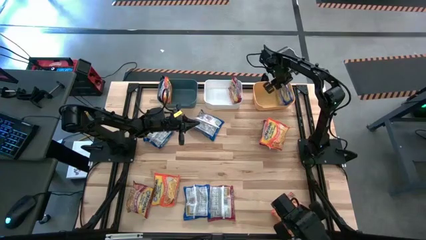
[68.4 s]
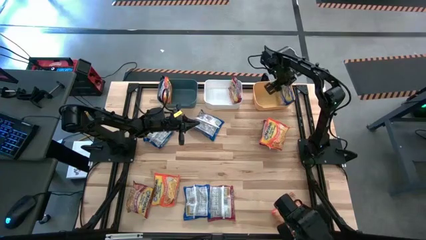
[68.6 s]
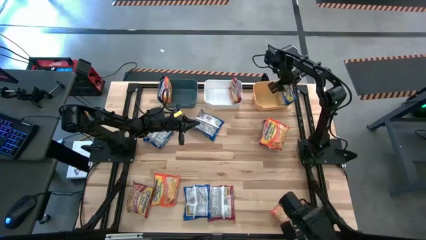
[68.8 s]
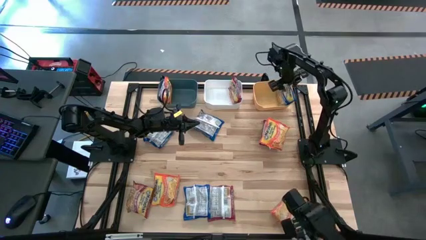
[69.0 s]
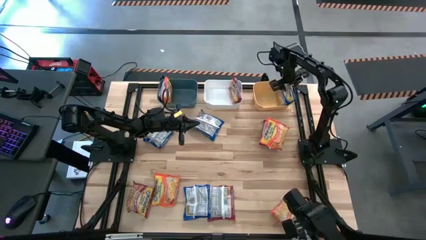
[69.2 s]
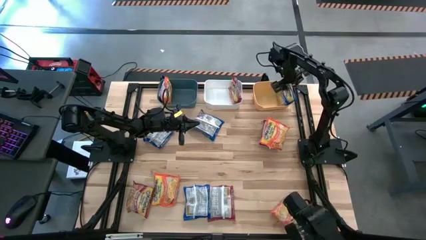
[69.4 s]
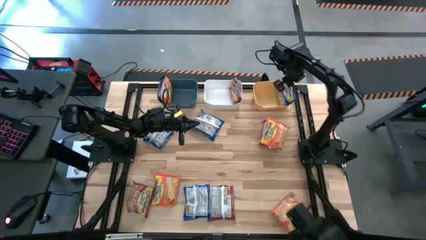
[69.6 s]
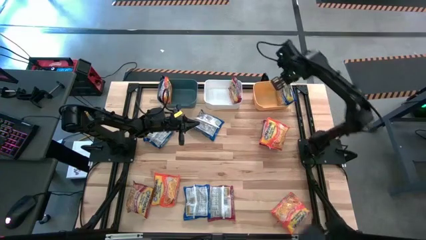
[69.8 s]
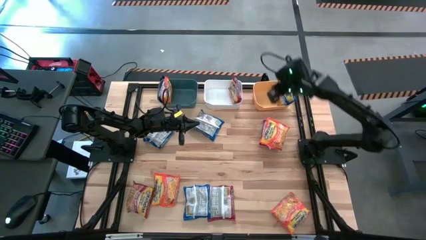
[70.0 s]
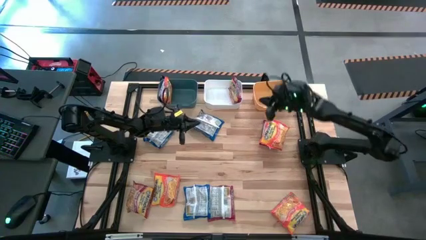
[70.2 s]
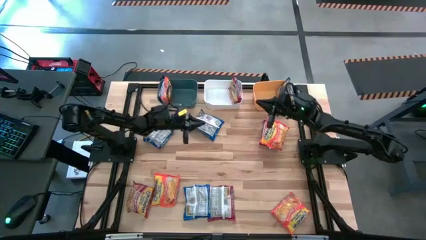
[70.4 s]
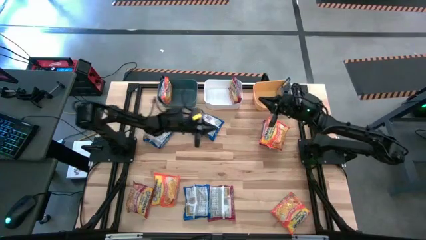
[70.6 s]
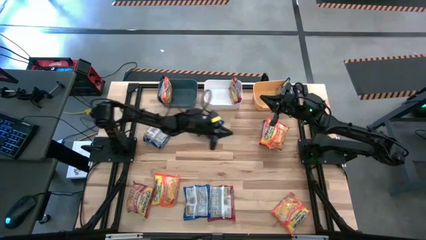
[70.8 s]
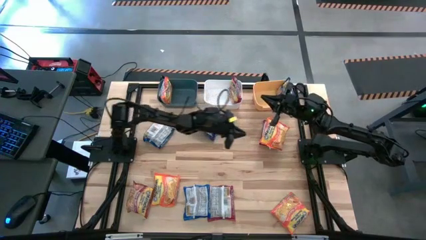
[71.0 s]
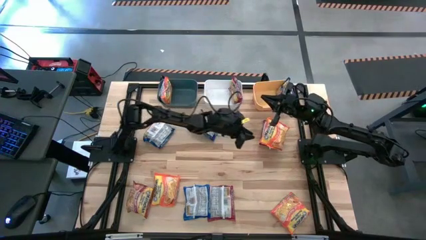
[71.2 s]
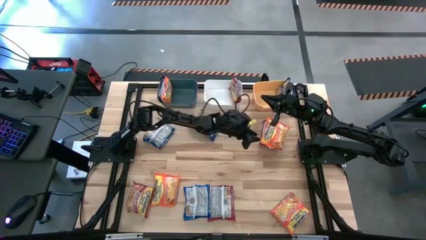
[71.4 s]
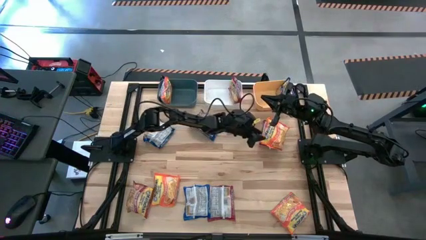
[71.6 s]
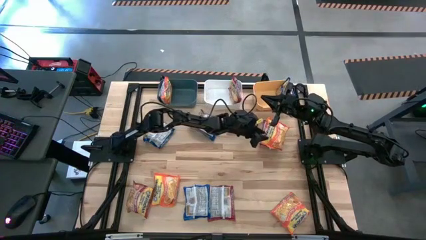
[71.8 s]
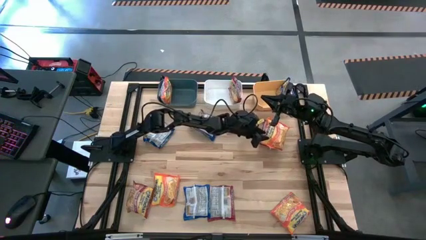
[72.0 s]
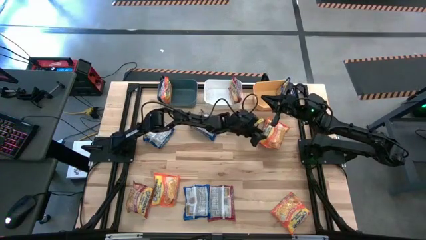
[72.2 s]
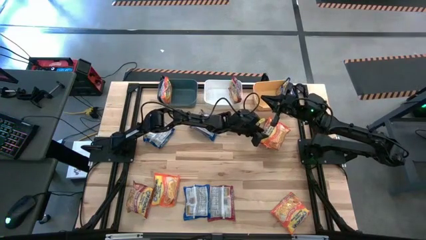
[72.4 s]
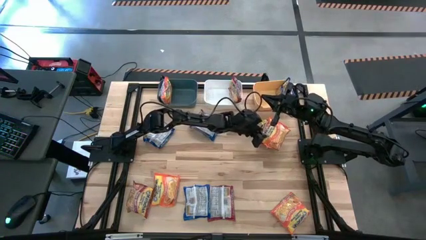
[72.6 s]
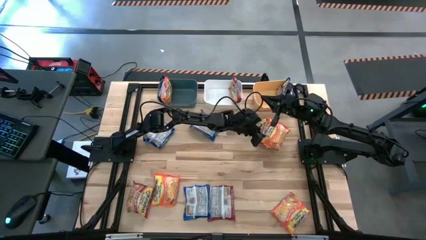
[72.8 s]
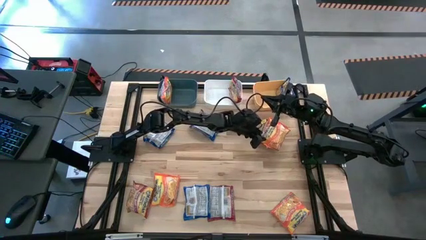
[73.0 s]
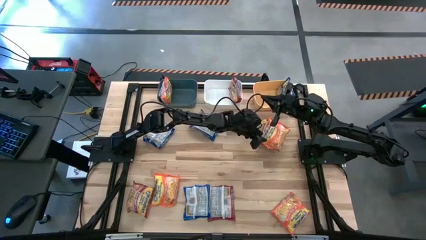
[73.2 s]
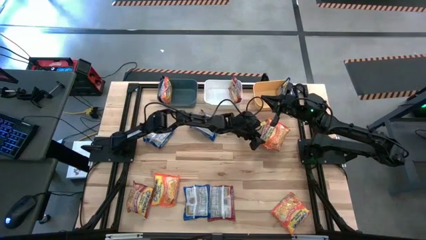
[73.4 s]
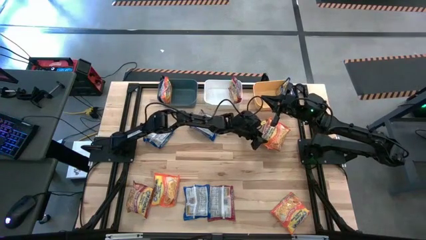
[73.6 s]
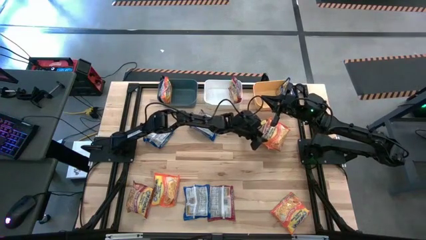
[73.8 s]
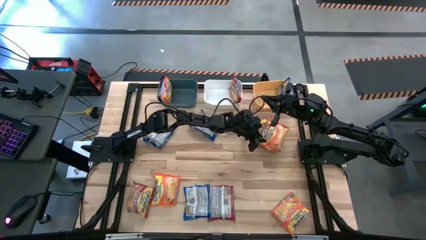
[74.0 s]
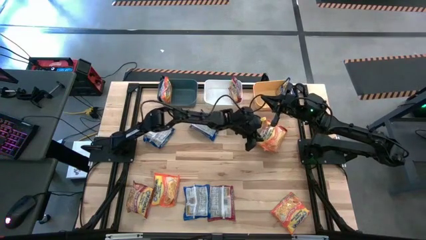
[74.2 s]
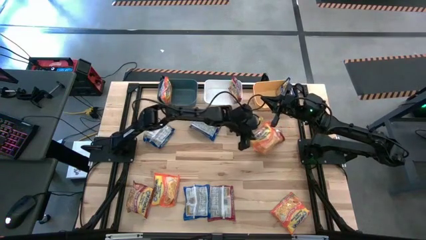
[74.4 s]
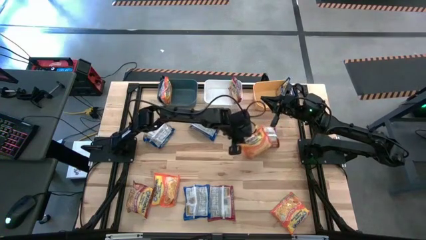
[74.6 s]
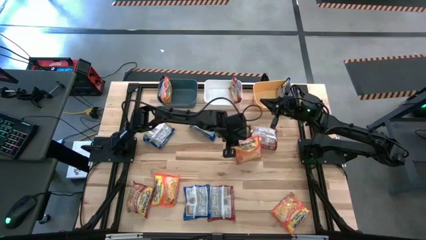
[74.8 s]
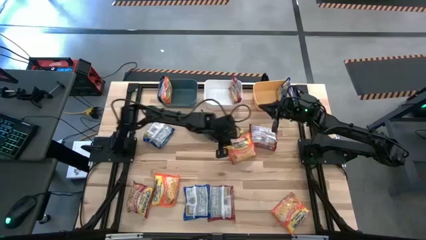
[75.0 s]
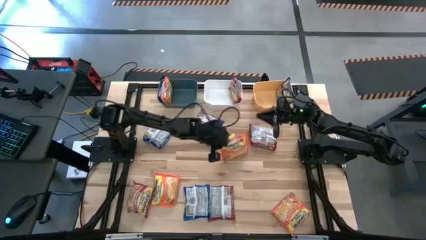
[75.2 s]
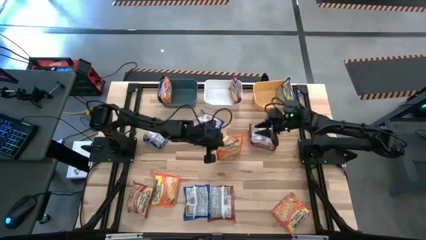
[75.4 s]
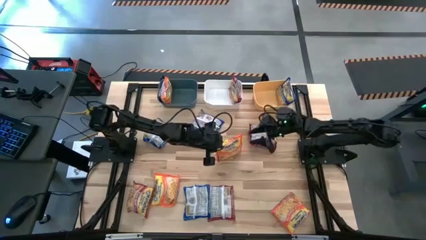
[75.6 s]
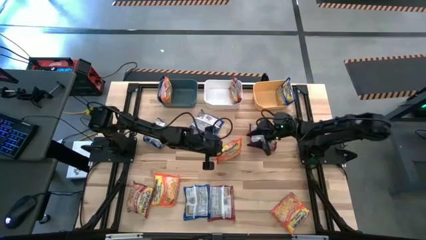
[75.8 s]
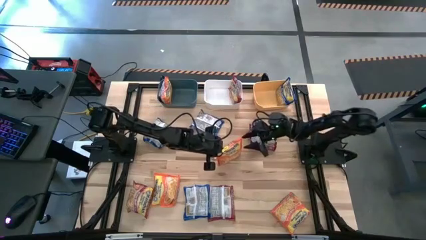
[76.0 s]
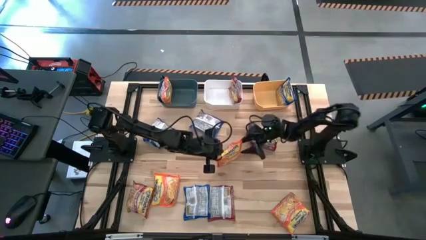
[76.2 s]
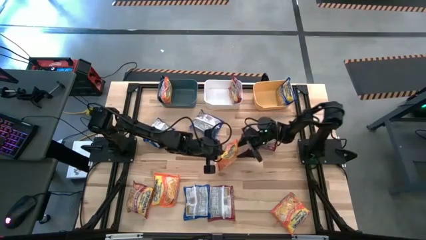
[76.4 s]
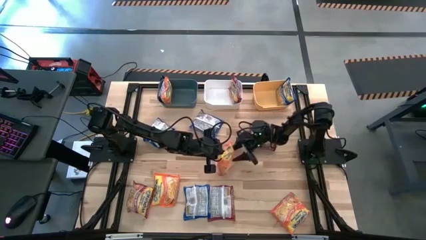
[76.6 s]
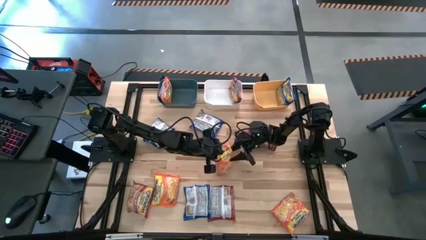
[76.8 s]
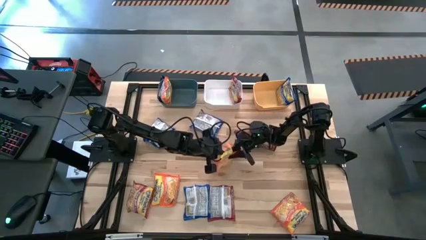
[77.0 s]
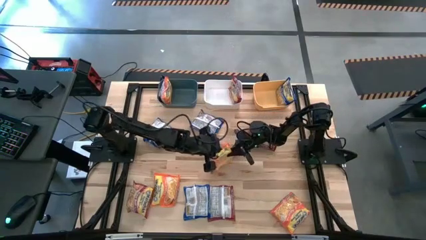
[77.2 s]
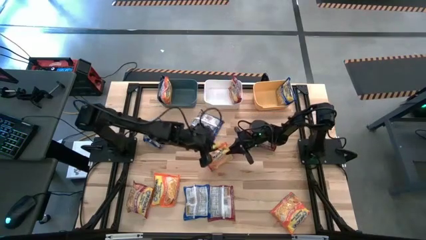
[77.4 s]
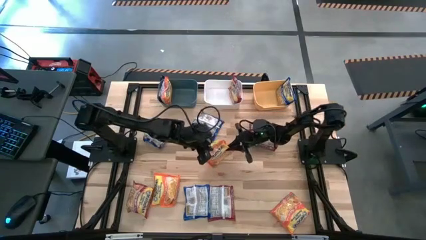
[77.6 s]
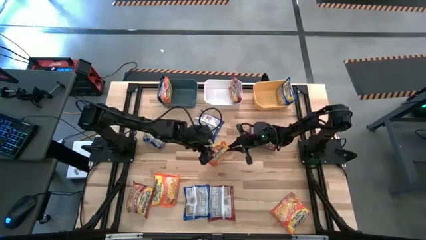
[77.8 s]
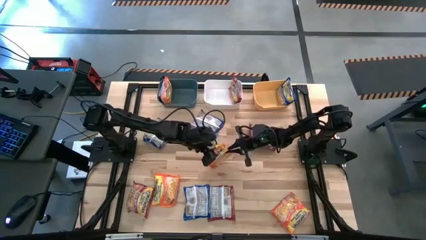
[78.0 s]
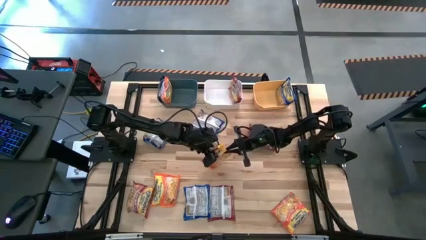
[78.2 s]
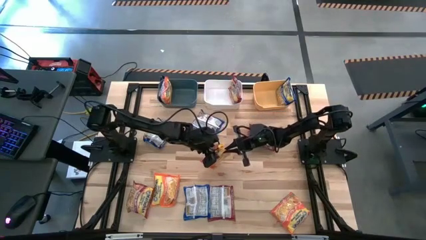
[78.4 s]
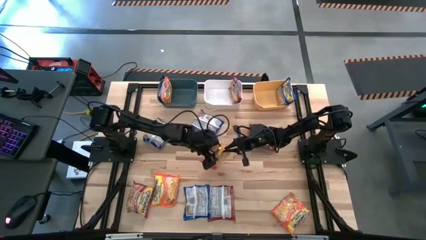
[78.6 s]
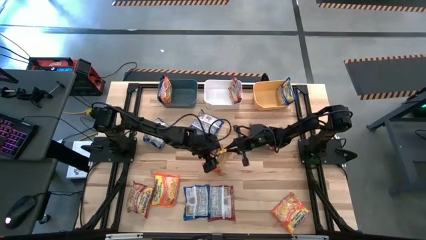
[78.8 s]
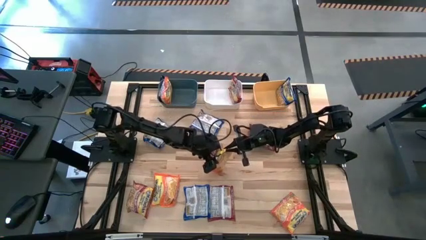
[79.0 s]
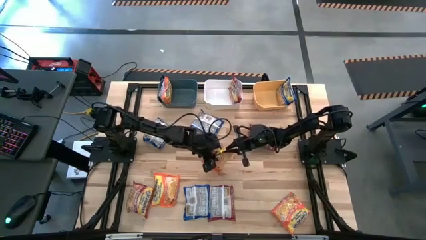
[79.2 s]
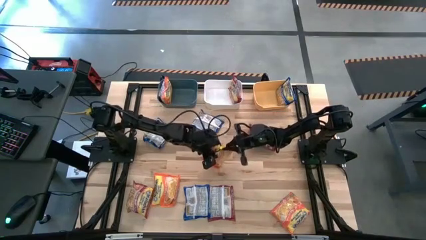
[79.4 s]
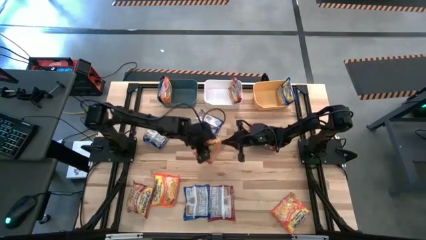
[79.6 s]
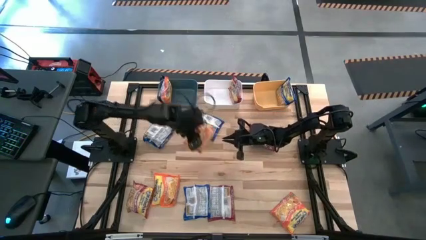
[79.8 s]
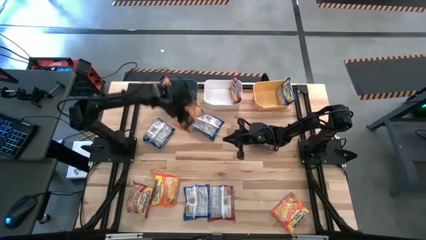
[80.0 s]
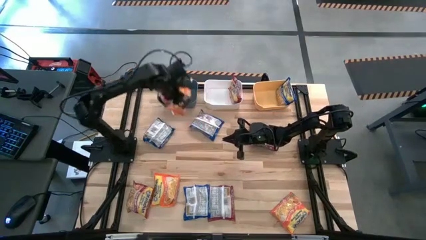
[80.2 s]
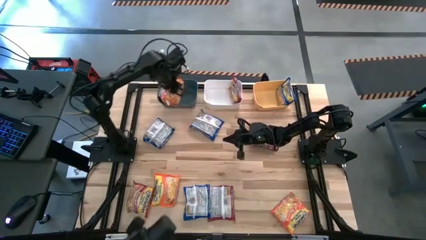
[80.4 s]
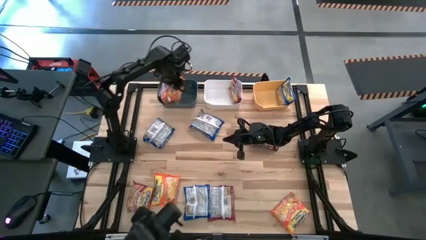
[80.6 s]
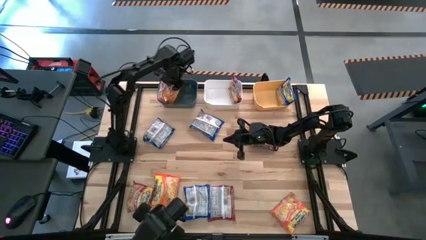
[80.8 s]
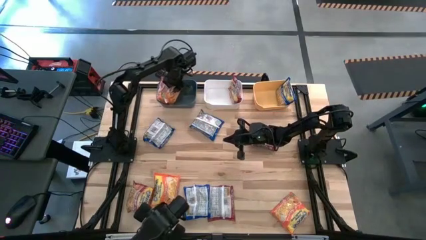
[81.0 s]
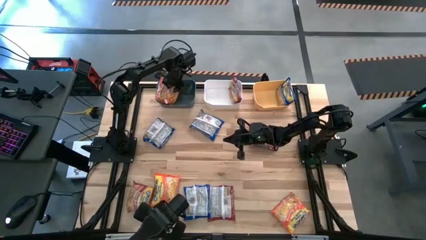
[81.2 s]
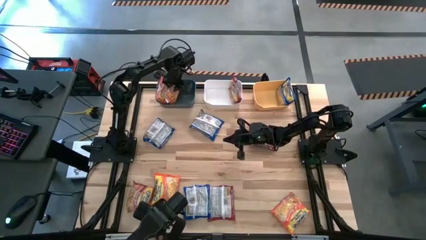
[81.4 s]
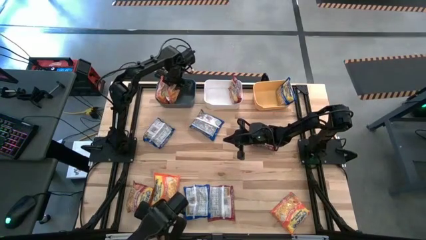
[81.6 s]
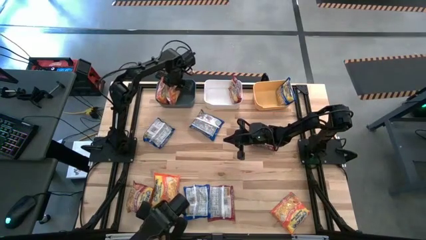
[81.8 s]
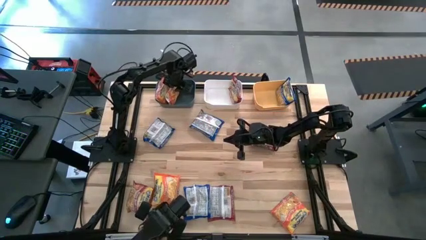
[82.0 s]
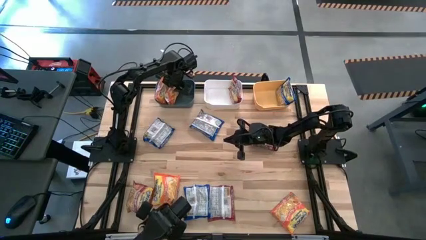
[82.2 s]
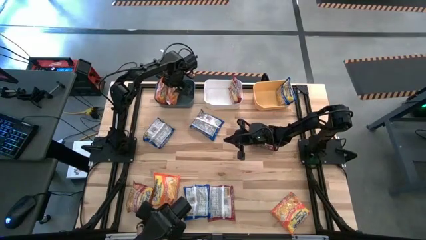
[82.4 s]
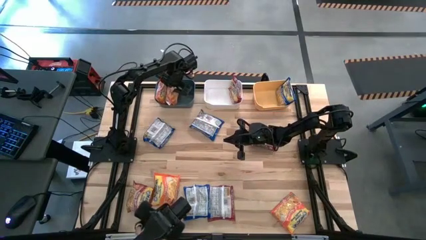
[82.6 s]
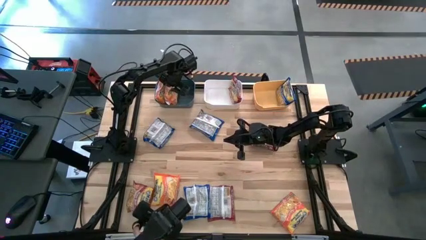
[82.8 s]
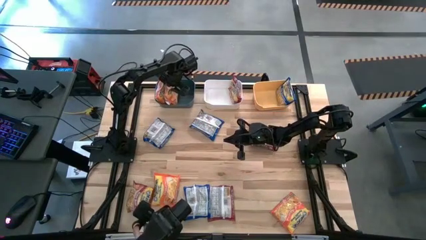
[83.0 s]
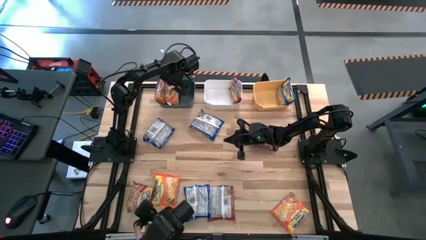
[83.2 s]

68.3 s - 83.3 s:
Task: Sort Maruchan noodles
Put the top orange noodle pack into the blue bin

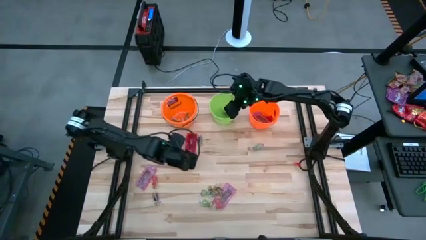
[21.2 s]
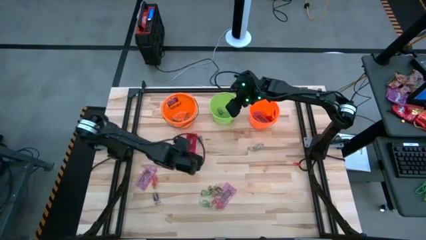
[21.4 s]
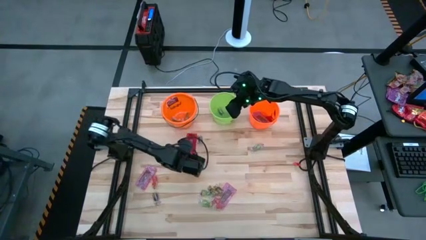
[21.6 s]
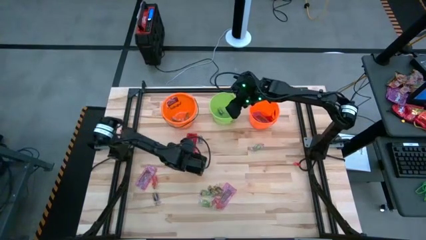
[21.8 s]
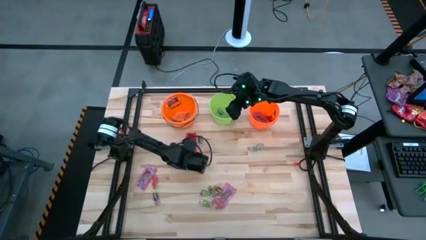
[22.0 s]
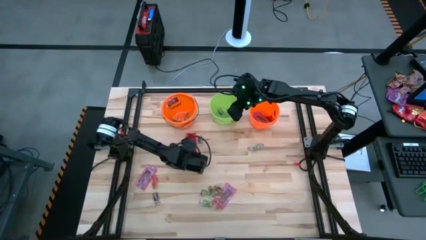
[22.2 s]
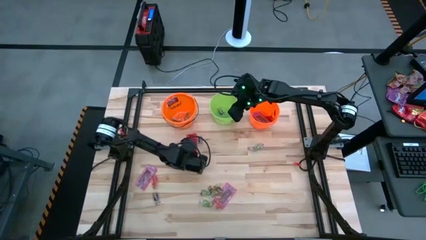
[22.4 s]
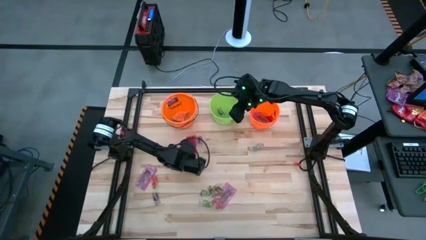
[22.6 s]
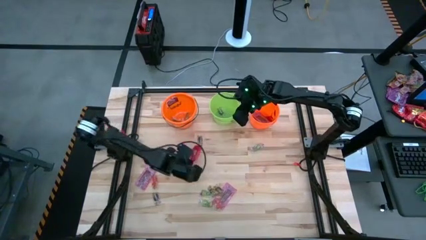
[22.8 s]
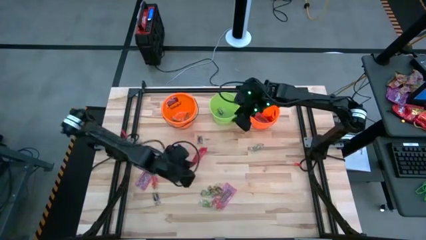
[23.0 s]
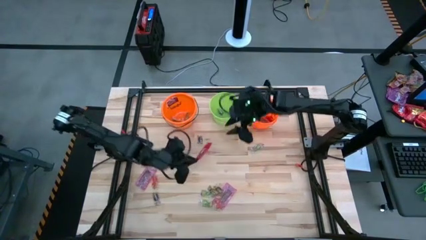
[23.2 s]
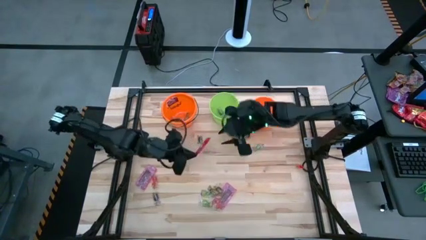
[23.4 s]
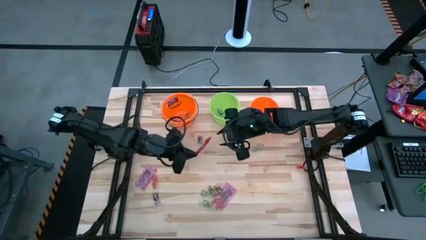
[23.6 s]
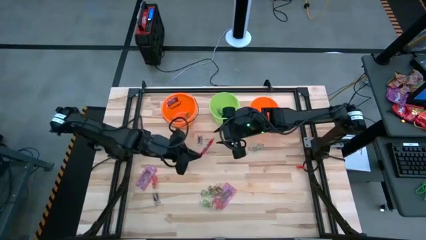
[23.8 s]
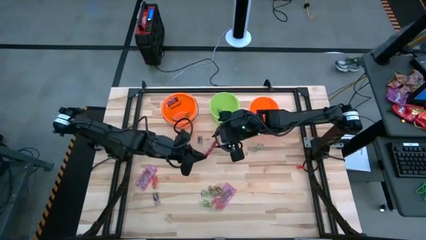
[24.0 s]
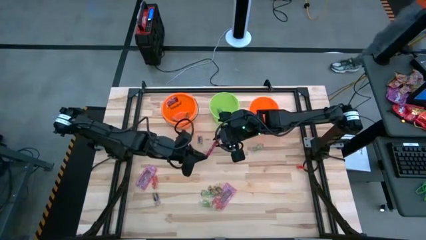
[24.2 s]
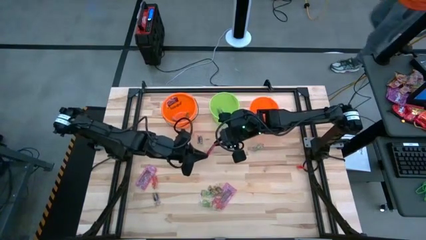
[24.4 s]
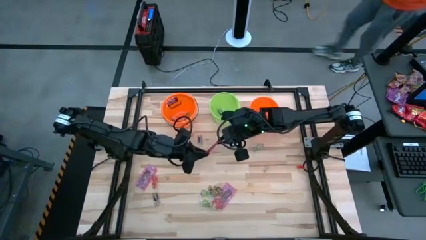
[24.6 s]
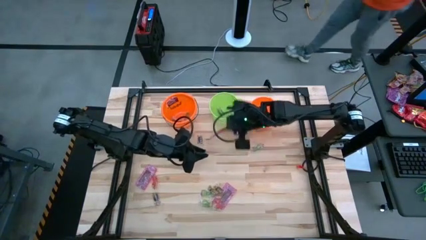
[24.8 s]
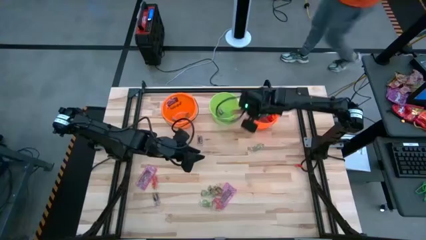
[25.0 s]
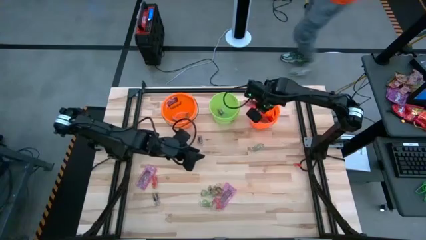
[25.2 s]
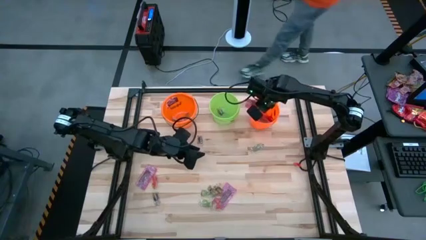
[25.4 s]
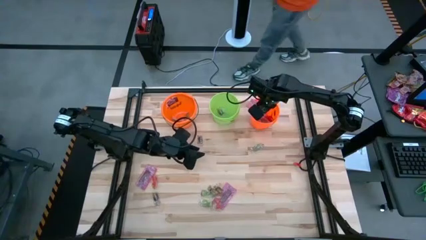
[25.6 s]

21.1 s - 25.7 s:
Task: Sort candy by brand, put in halloween buckets
Put the red candy into the left orange bucket
